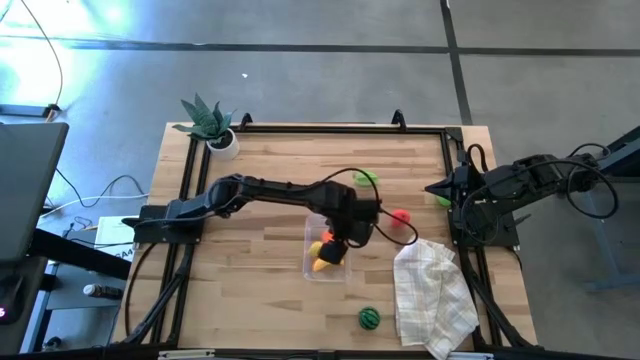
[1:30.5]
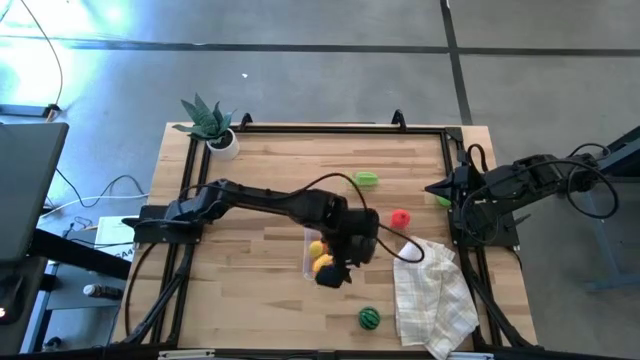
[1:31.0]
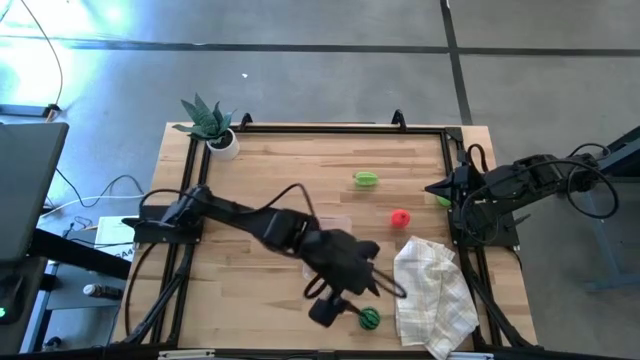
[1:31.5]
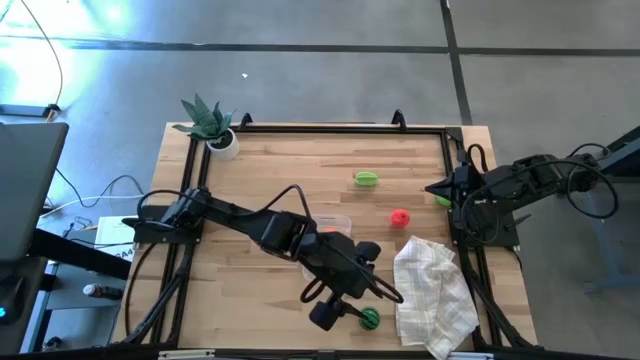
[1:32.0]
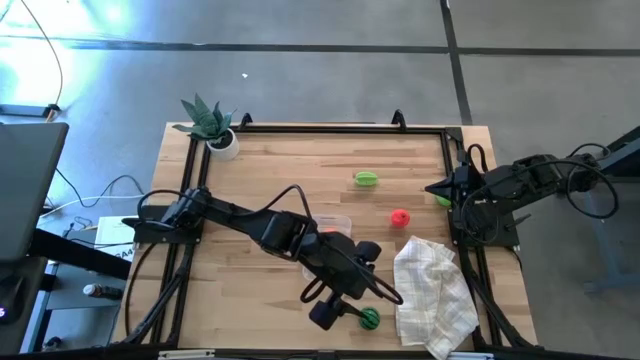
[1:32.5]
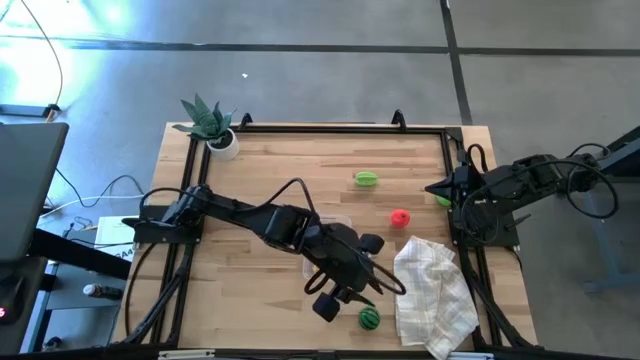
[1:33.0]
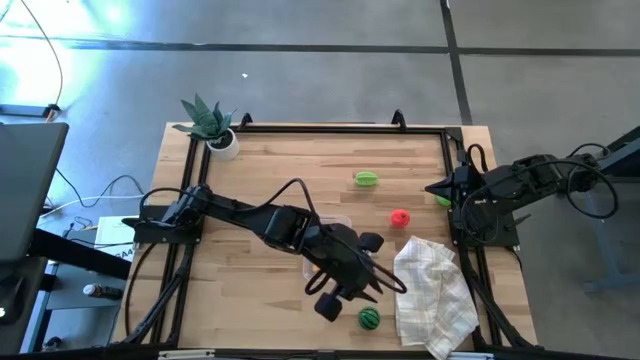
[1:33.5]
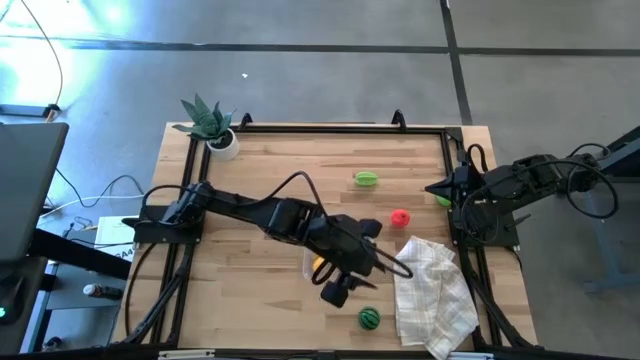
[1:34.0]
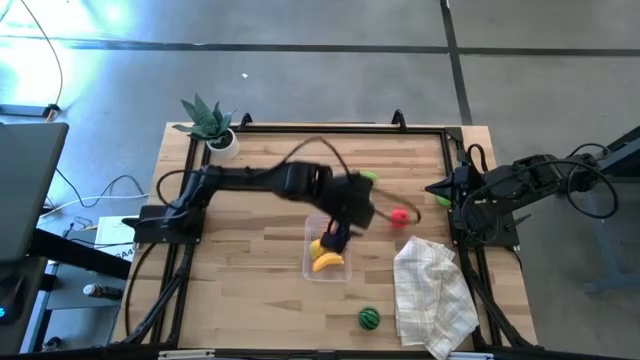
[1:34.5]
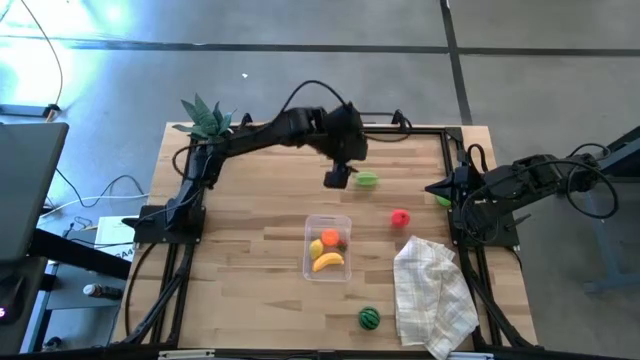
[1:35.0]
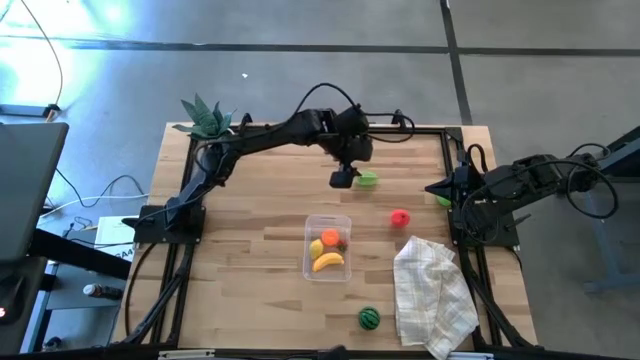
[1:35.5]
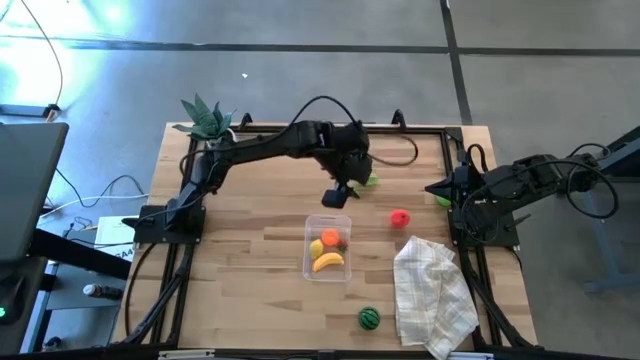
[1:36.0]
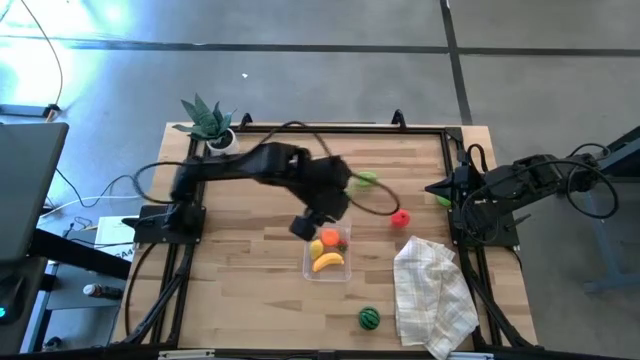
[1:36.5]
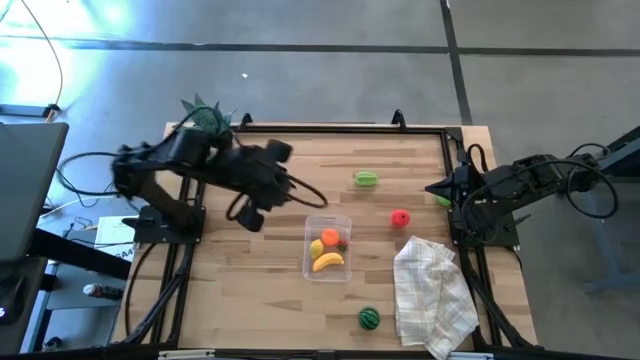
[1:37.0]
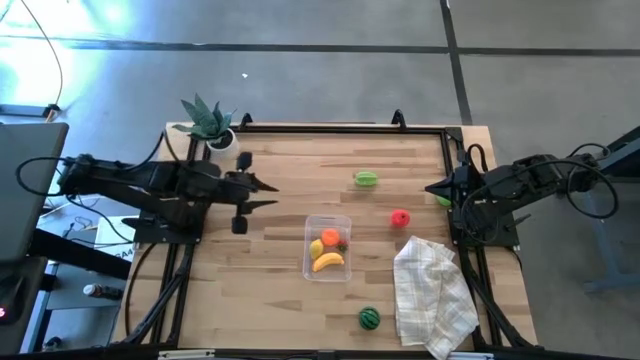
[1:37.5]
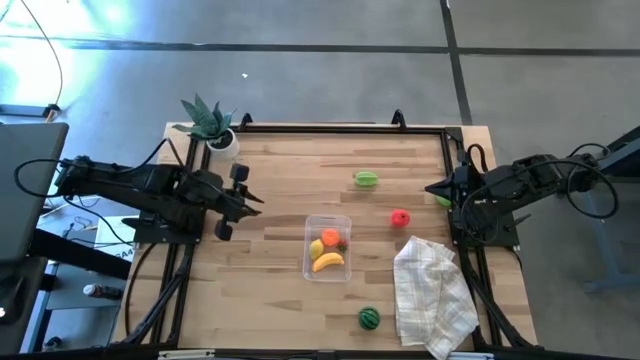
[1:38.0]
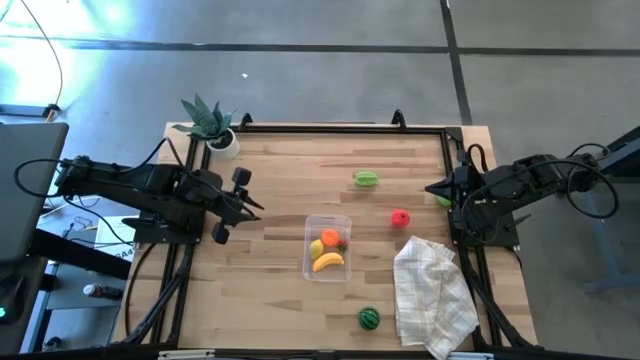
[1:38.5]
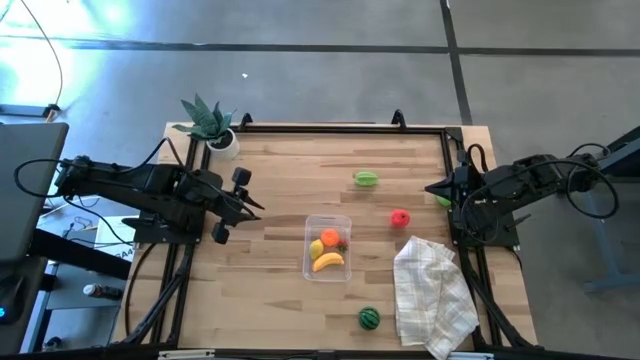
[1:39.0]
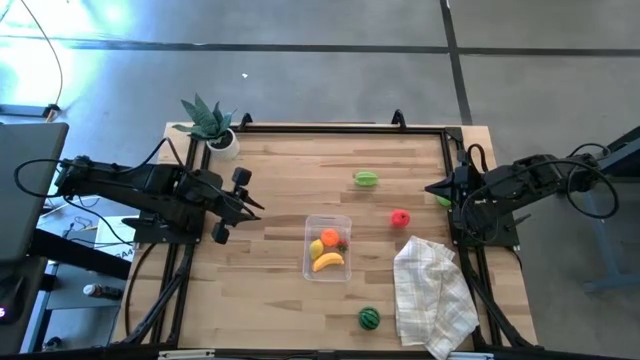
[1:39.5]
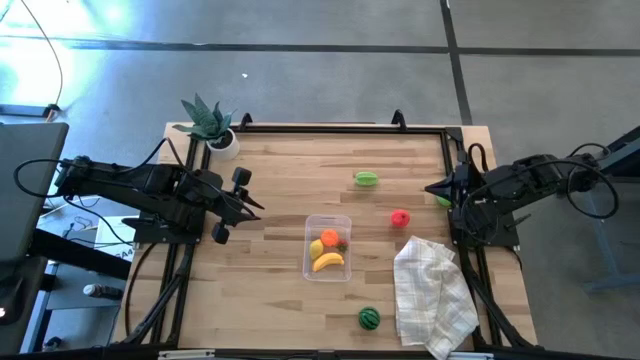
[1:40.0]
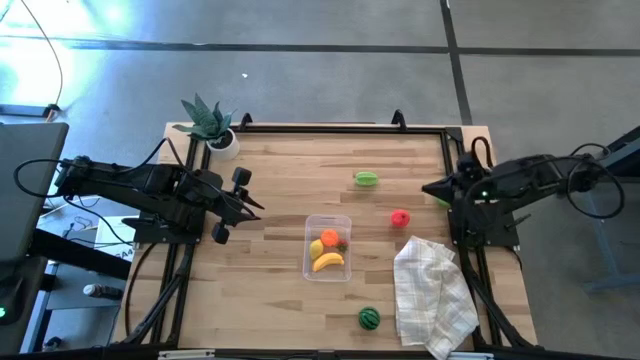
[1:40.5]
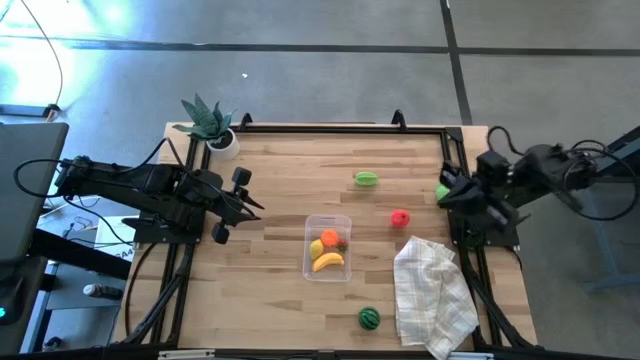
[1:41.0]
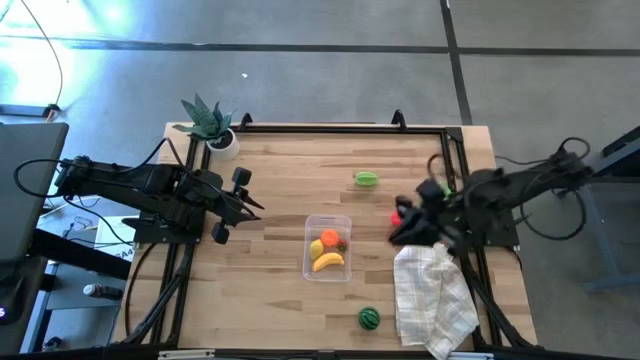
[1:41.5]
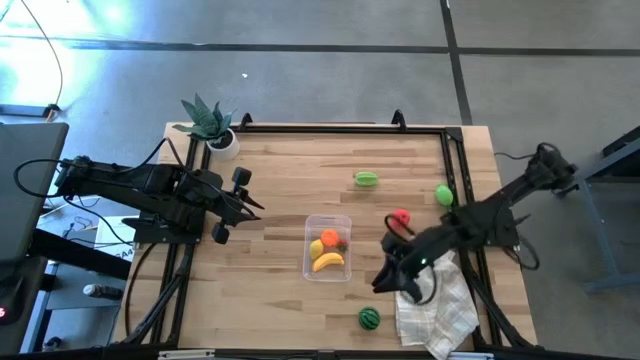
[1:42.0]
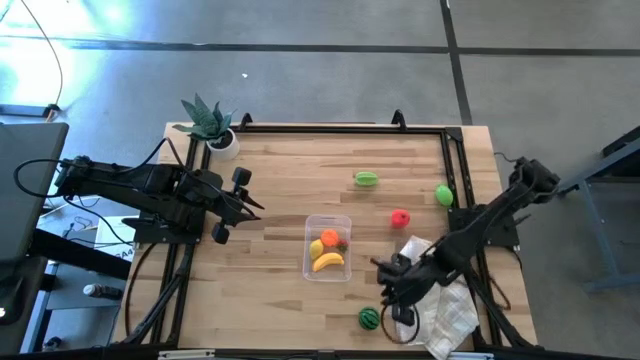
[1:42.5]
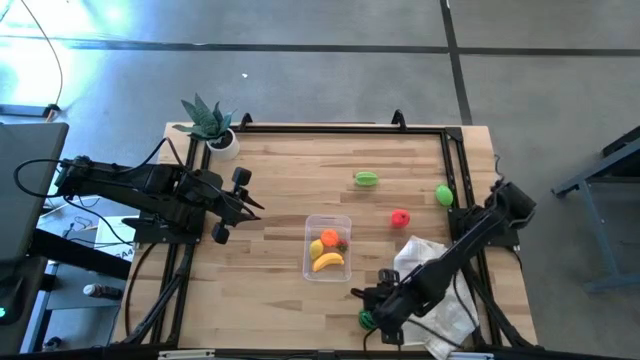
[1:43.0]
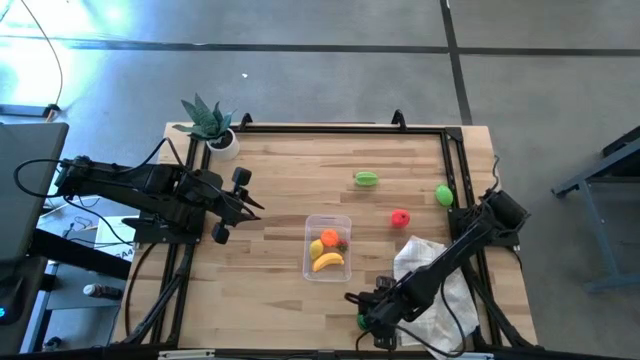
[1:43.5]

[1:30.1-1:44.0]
Task: Pick and placing Produce into tupperware
Put the watermelon into the transparent bin
